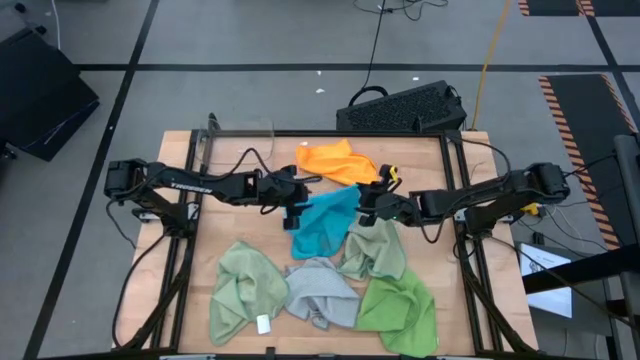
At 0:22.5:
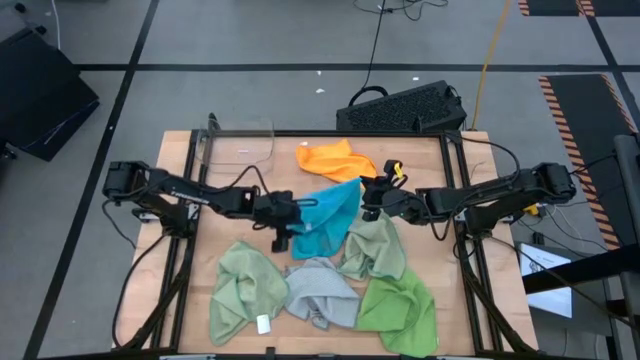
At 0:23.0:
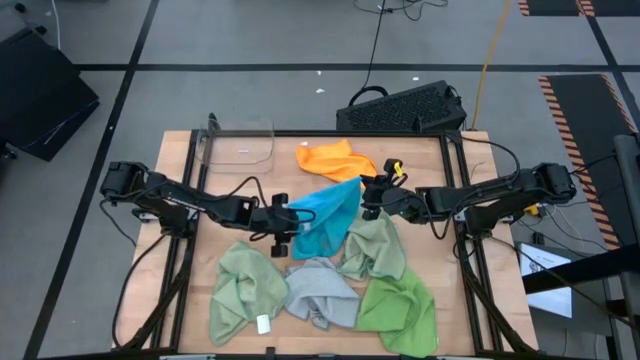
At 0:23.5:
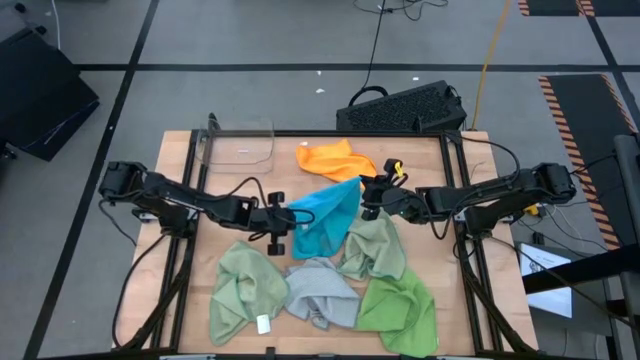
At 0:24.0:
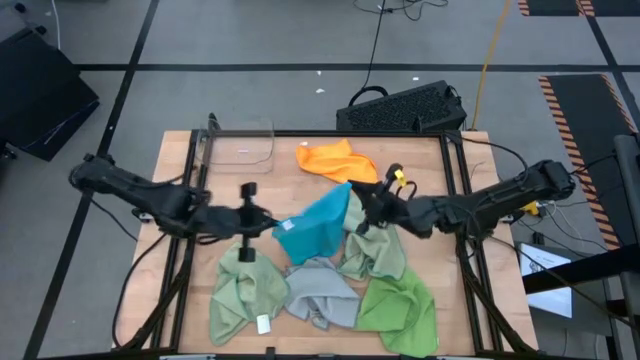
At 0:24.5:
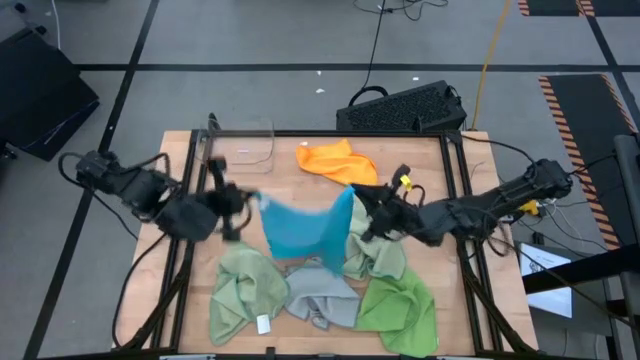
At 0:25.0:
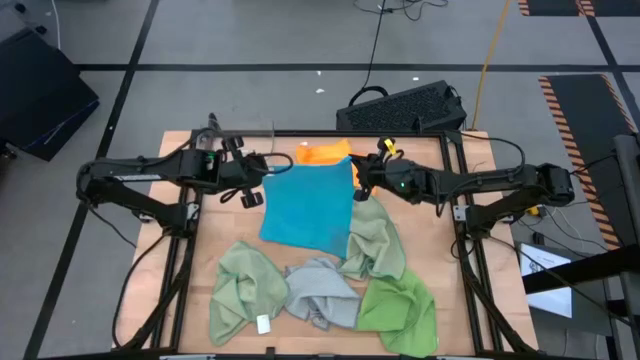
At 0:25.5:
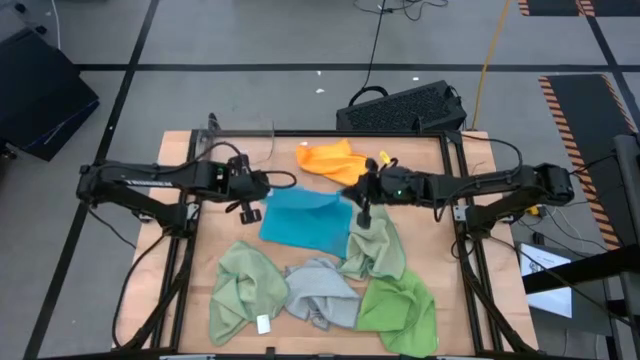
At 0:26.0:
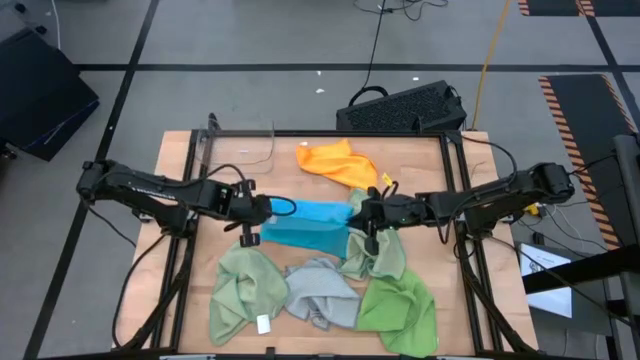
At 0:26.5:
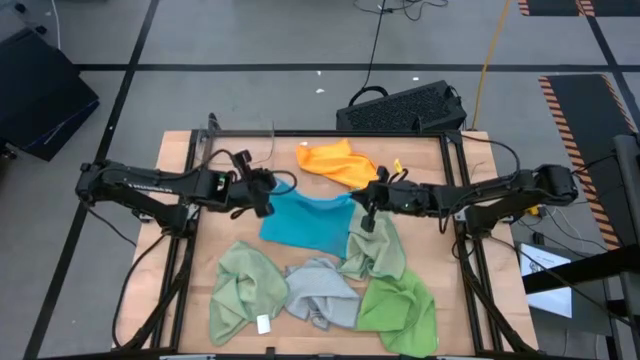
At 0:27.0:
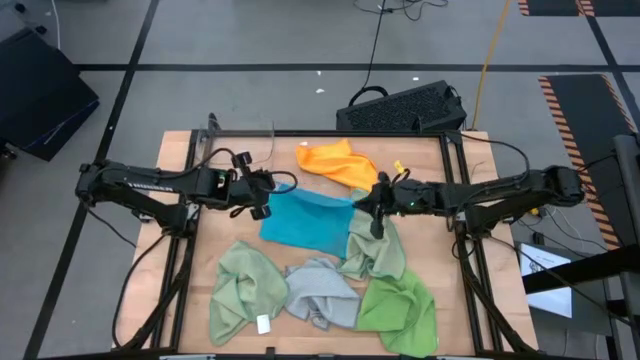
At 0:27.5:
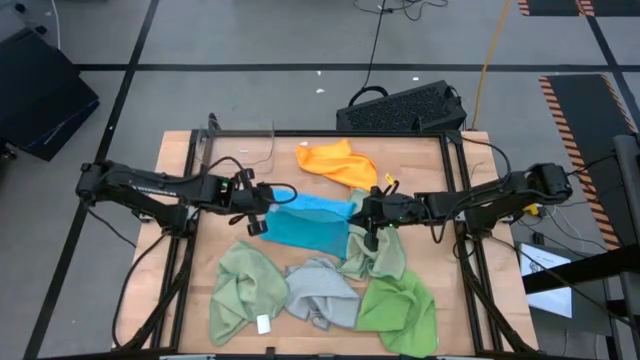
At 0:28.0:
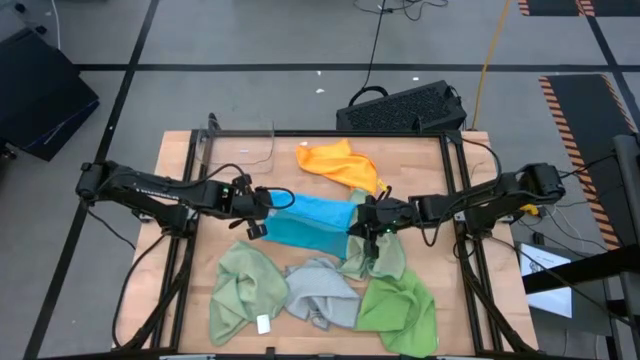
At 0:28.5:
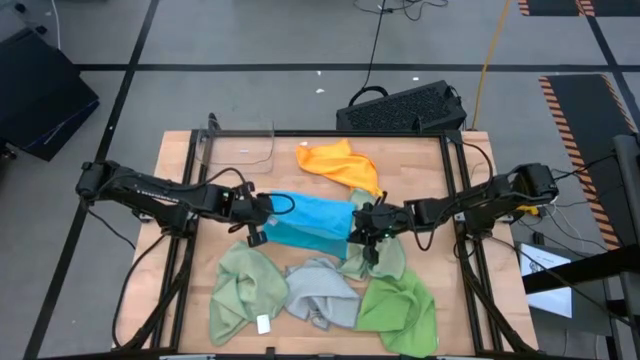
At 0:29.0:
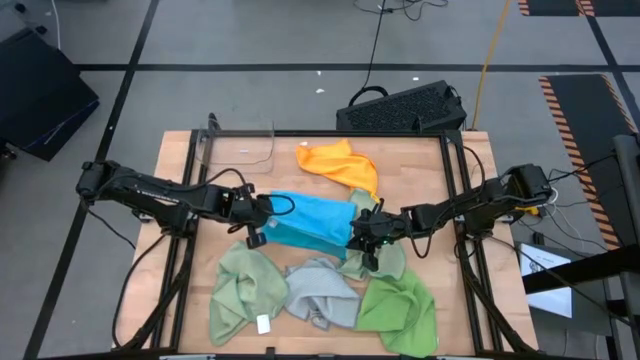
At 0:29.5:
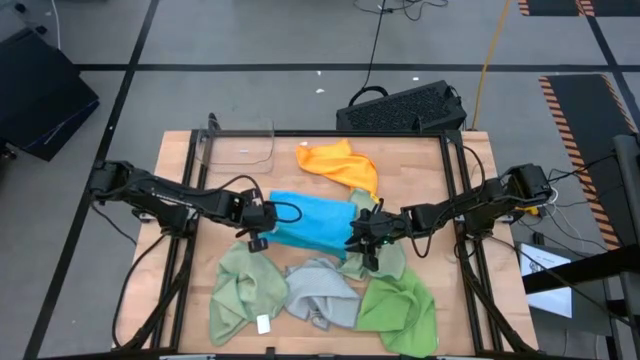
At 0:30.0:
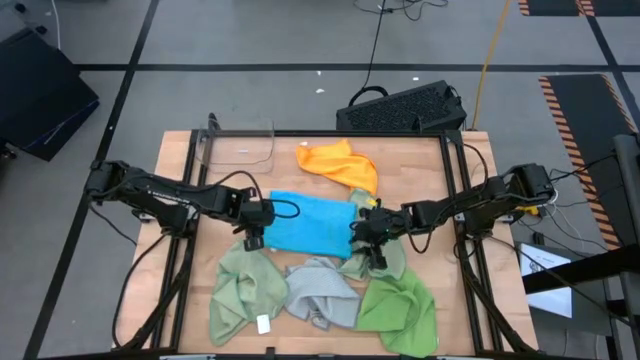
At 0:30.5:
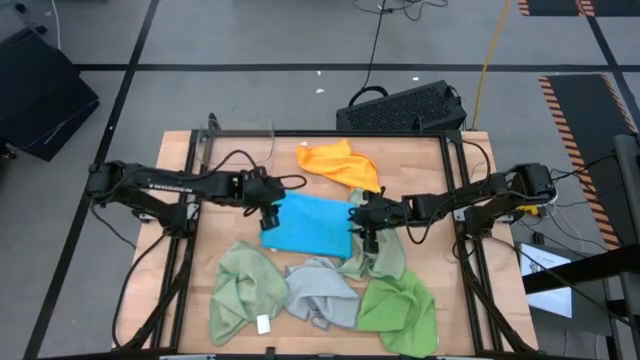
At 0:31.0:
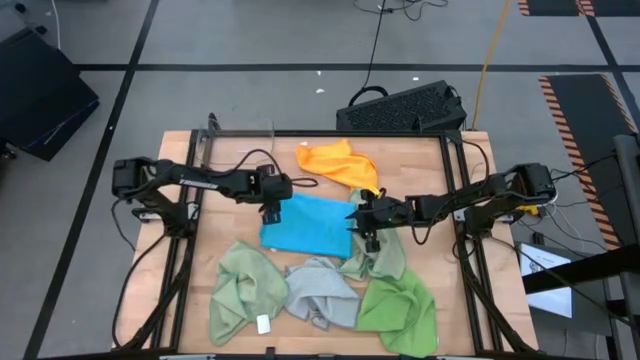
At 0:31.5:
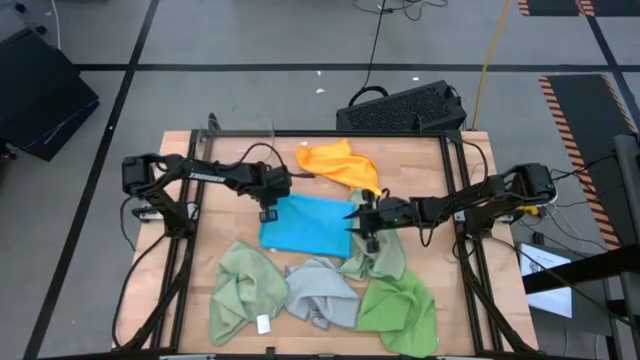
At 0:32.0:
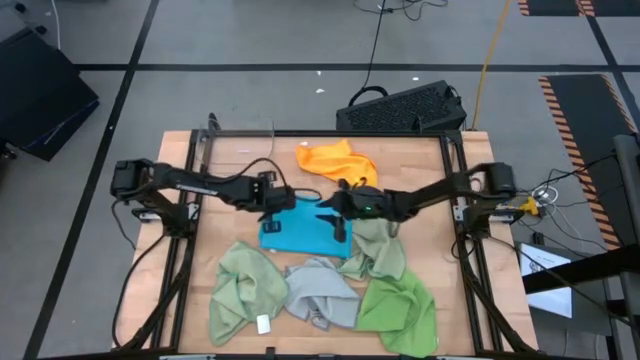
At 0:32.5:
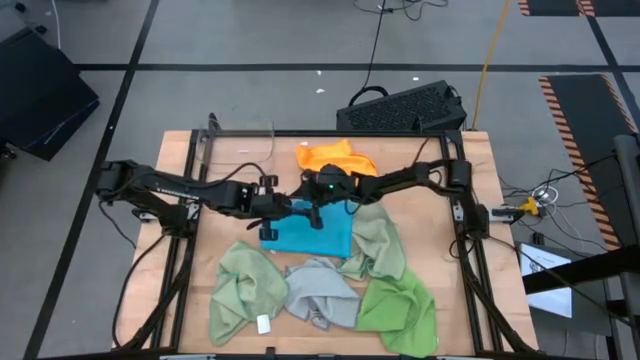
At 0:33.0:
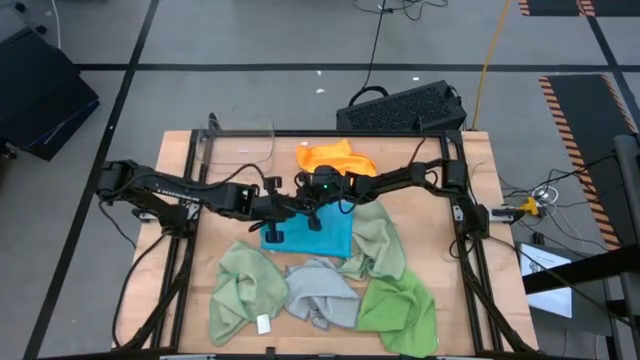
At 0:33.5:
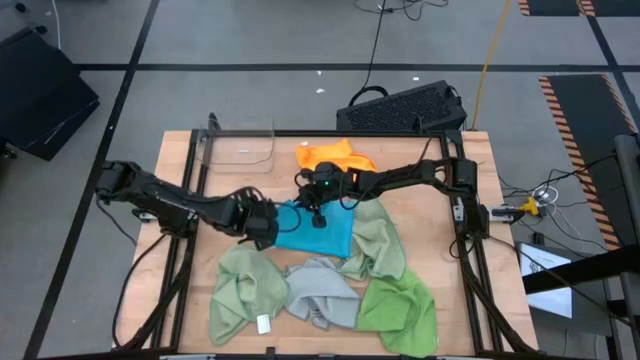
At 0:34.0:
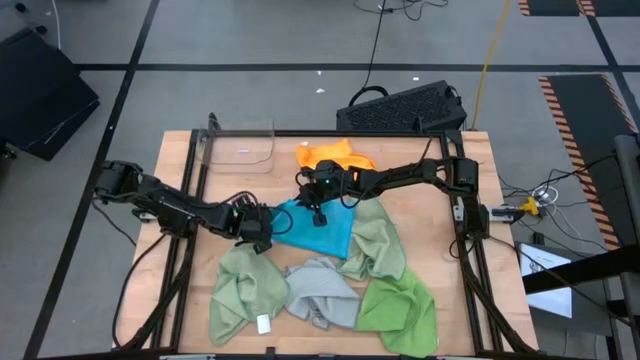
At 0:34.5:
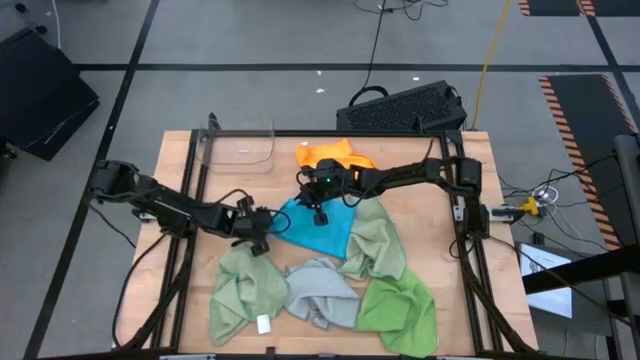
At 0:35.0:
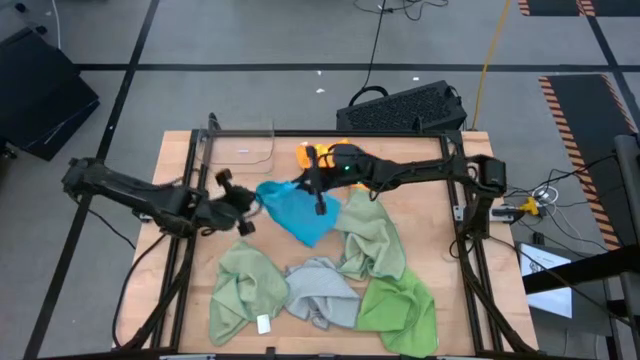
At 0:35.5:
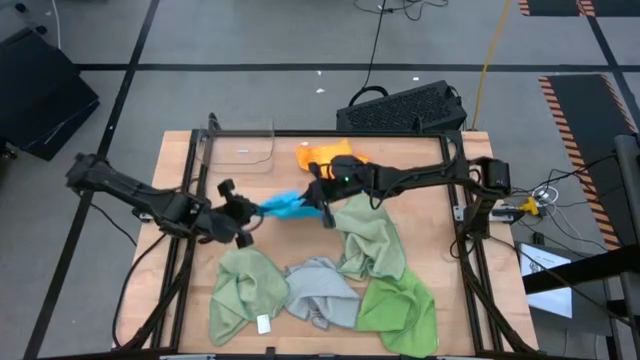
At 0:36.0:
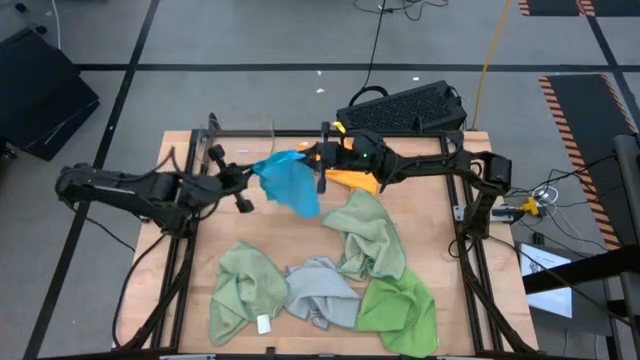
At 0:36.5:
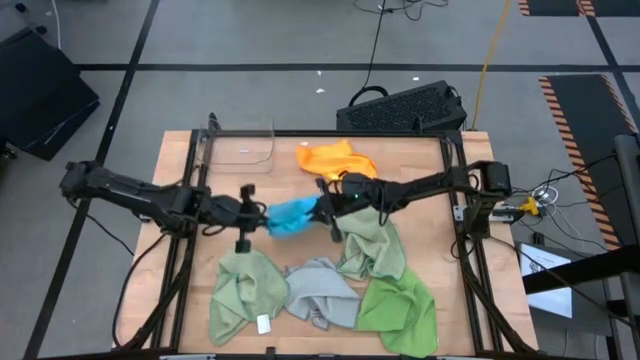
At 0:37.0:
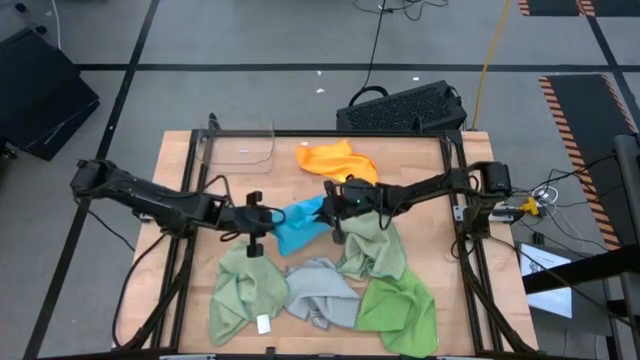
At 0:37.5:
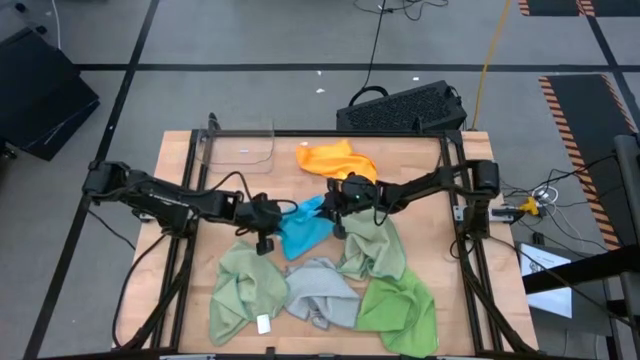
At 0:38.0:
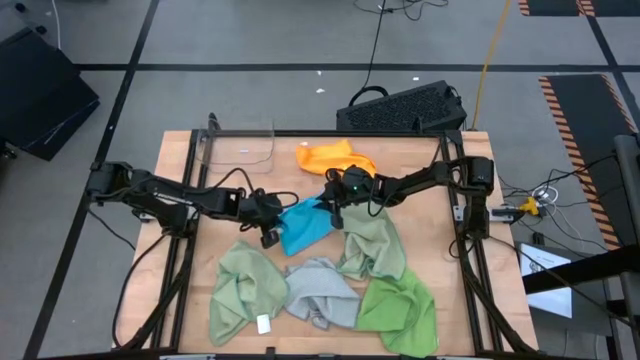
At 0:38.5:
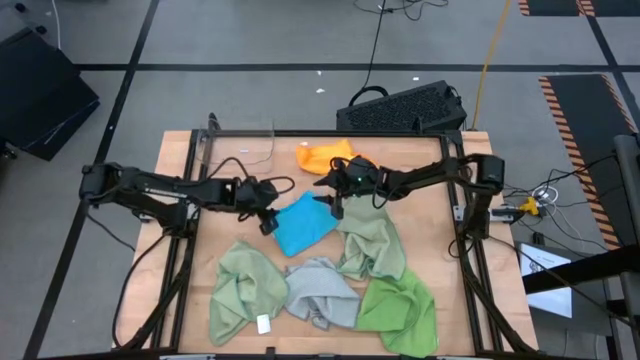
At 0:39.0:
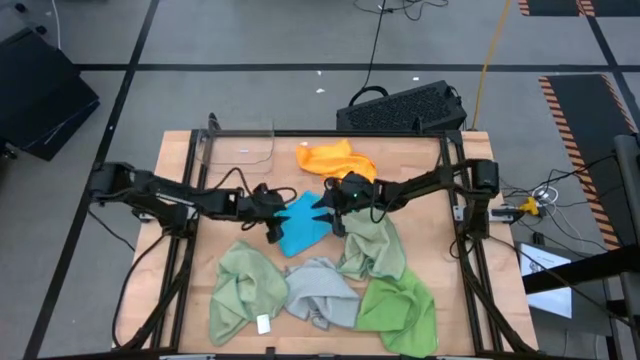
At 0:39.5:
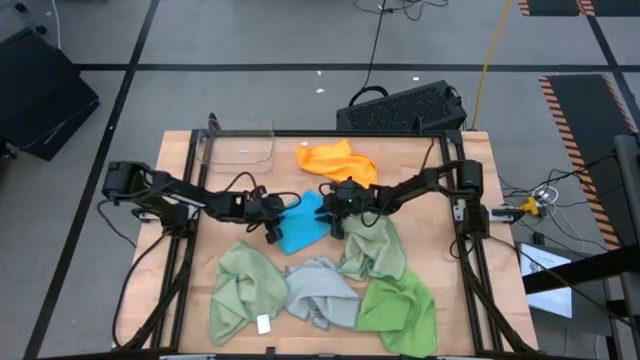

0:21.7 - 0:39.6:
Task: Fold microfiber towels
Fold the blue microfiber cloth

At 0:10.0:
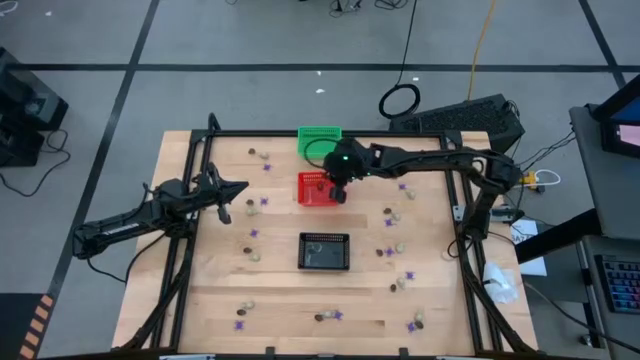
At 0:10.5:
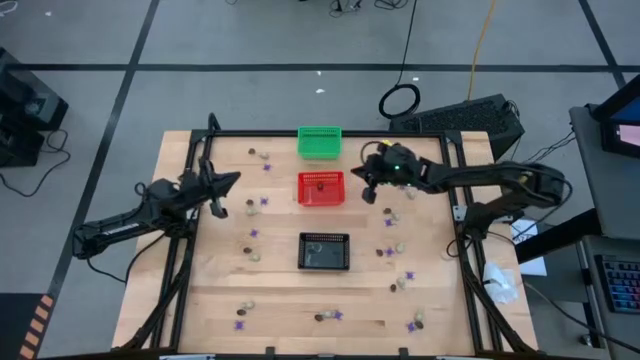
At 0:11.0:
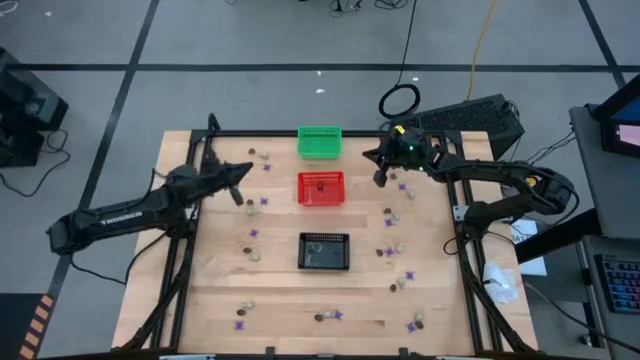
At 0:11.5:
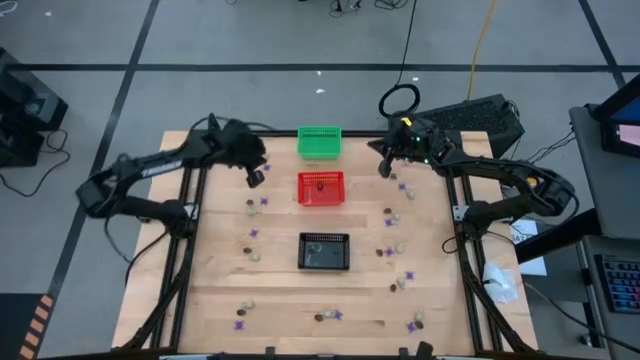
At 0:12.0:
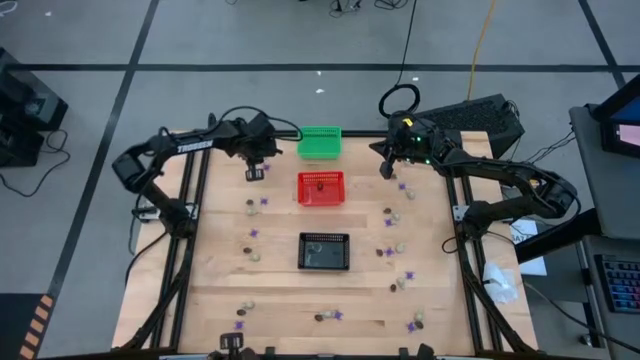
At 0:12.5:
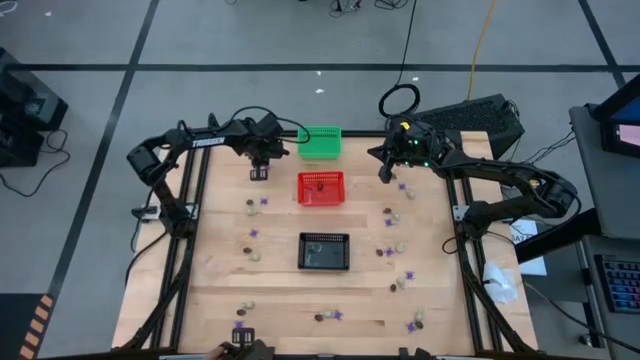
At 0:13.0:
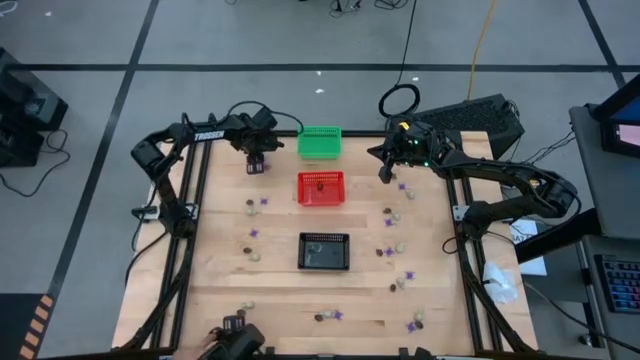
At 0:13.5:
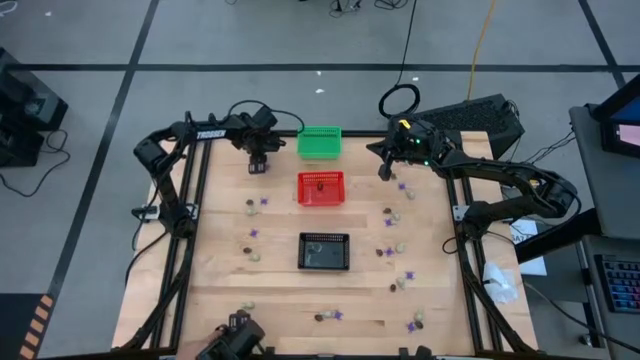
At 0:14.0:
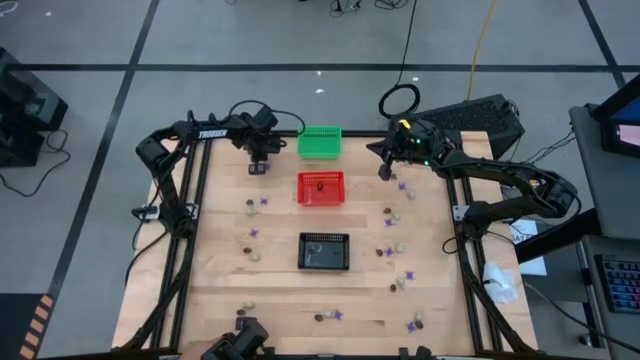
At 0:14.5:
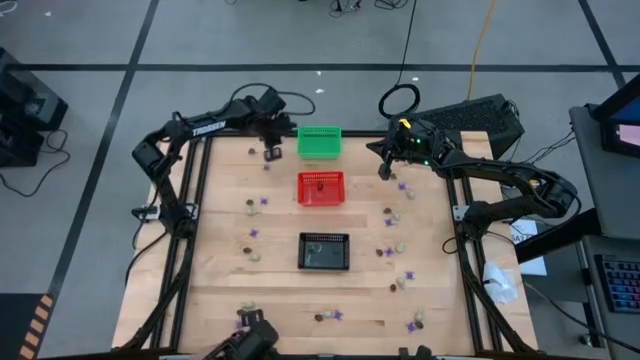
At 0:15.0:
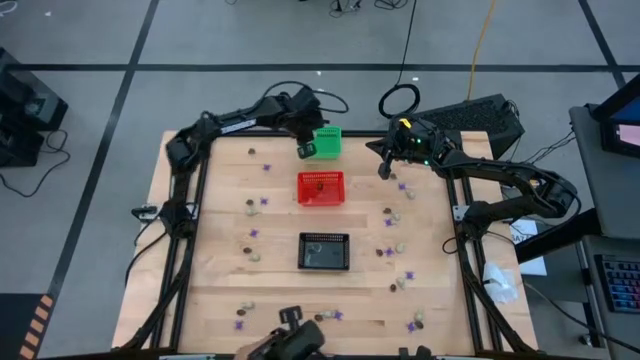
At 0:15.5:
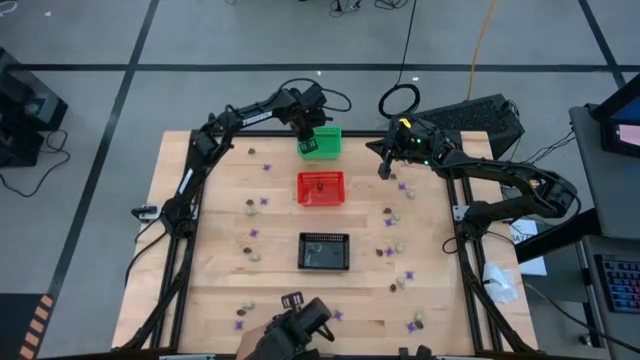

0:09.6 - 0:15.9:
Task: Sort Halloween decoration
Put the white skull toy into the green basket
